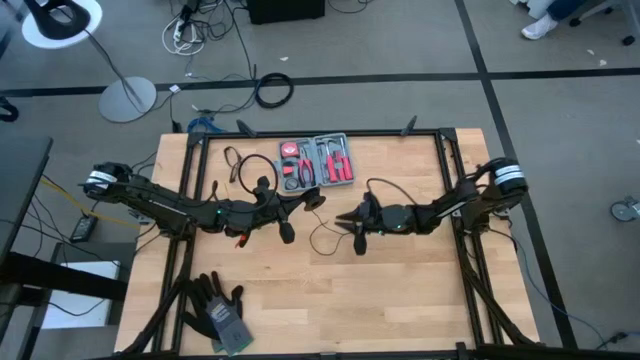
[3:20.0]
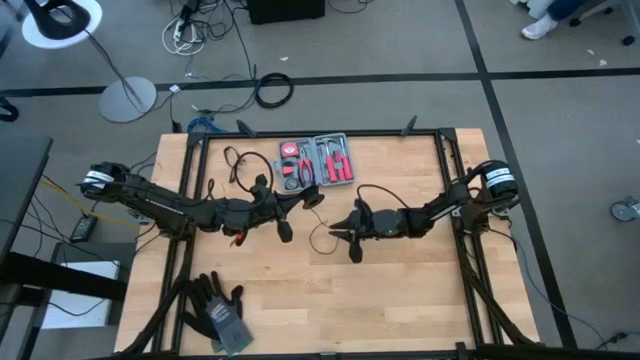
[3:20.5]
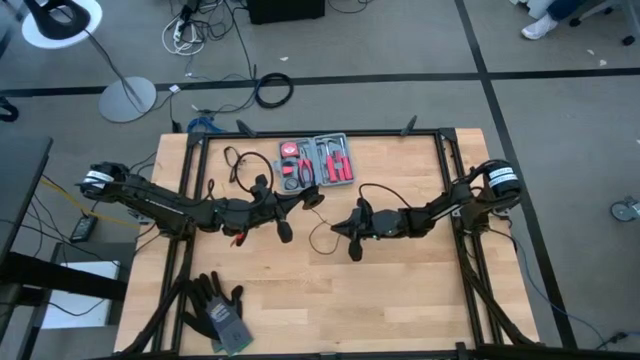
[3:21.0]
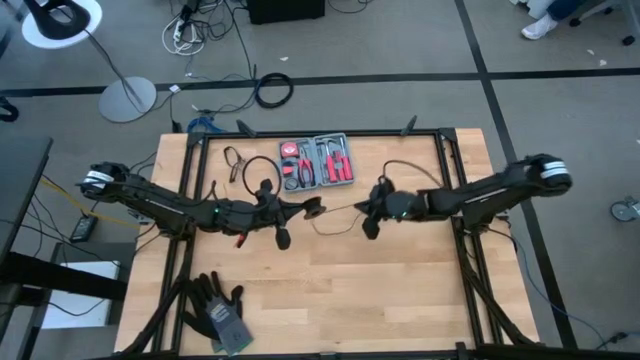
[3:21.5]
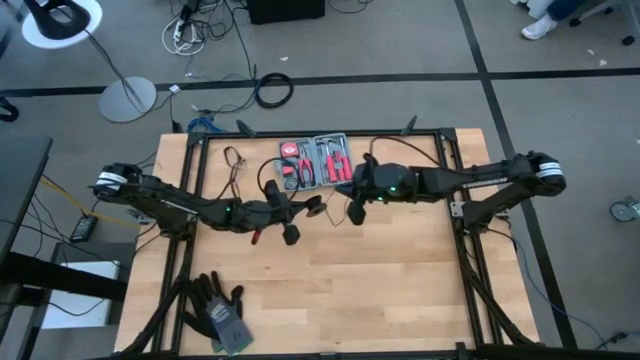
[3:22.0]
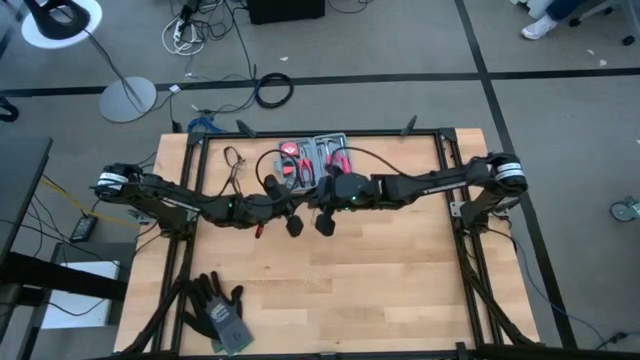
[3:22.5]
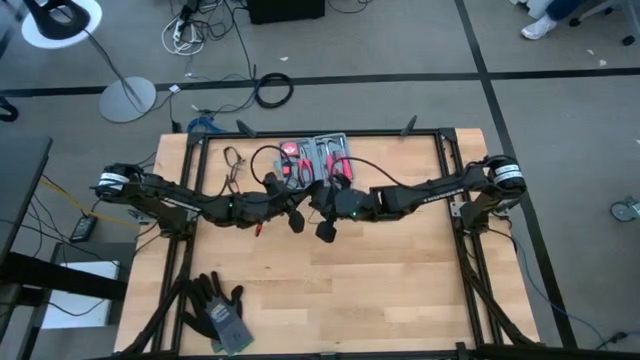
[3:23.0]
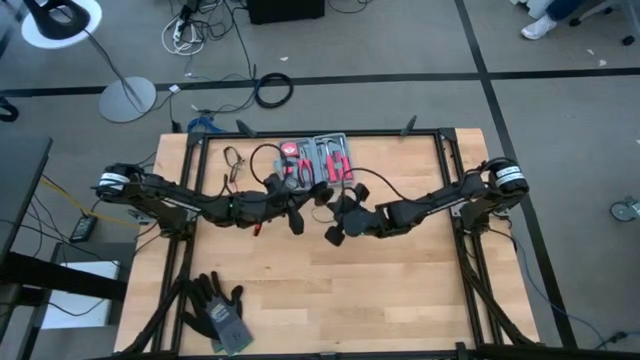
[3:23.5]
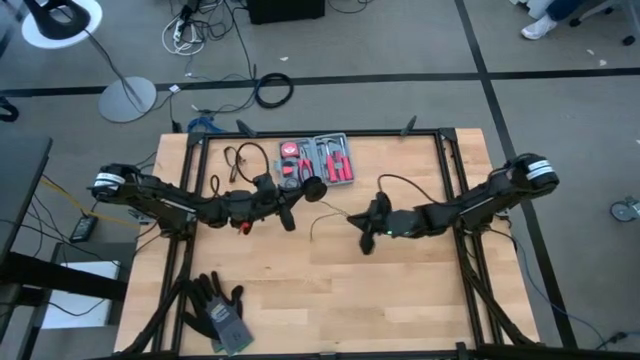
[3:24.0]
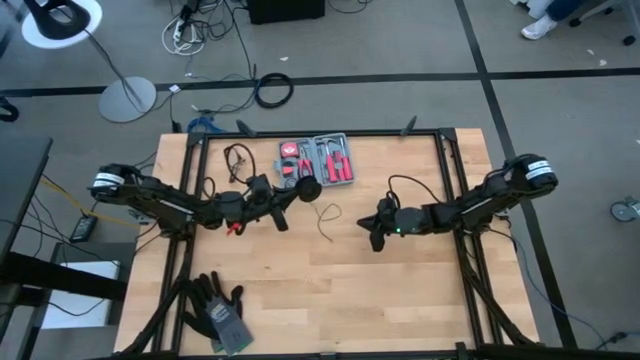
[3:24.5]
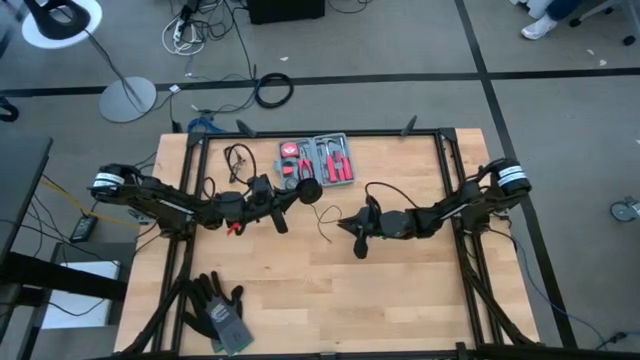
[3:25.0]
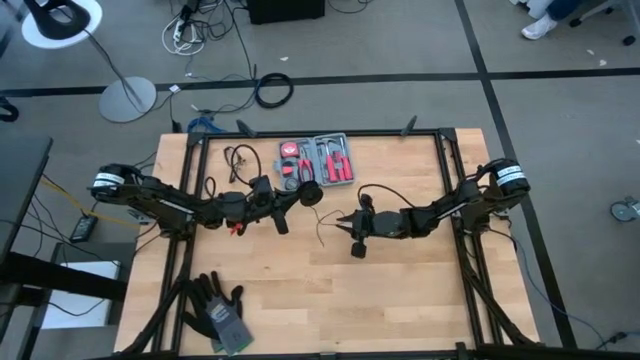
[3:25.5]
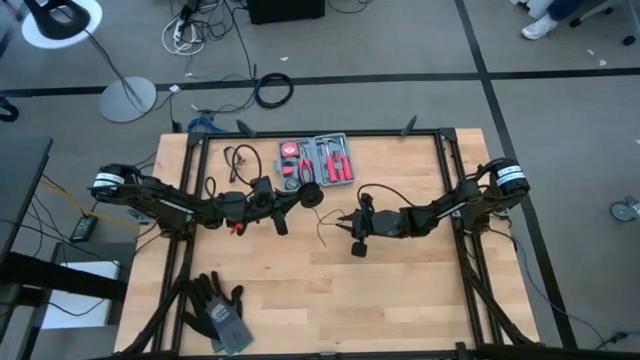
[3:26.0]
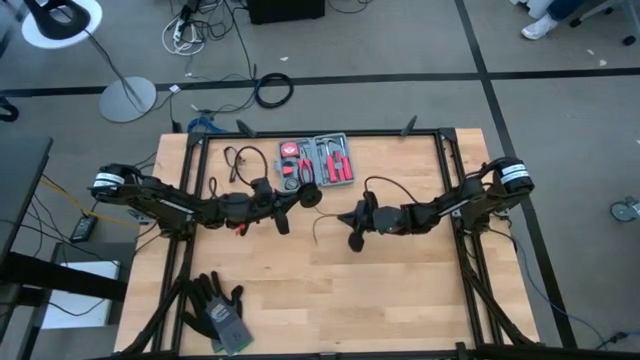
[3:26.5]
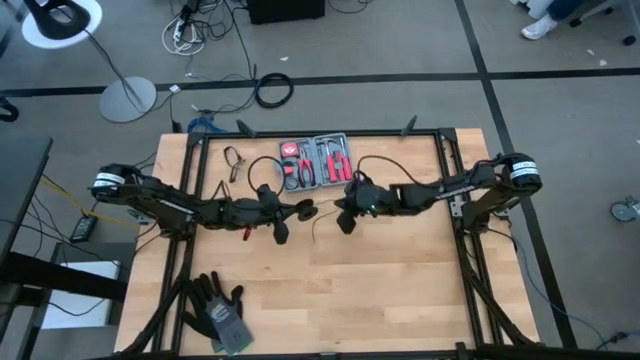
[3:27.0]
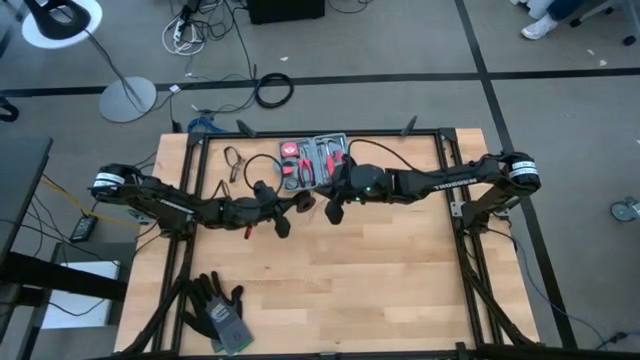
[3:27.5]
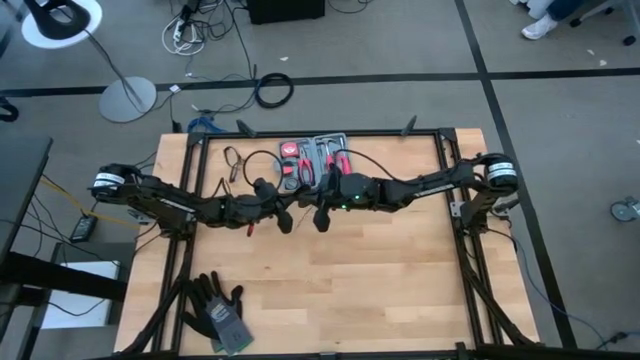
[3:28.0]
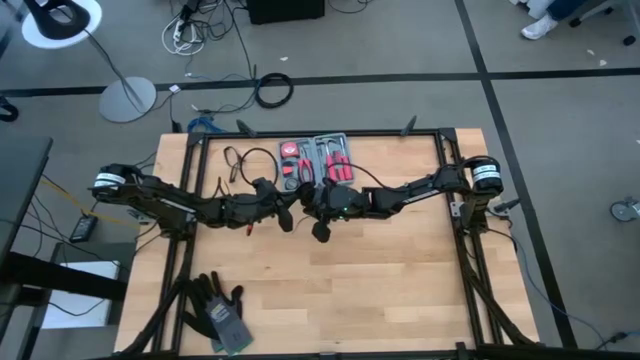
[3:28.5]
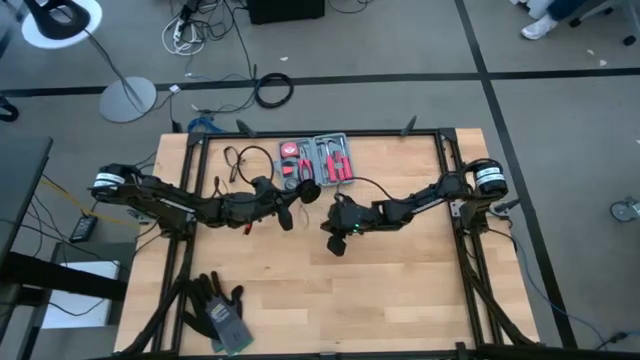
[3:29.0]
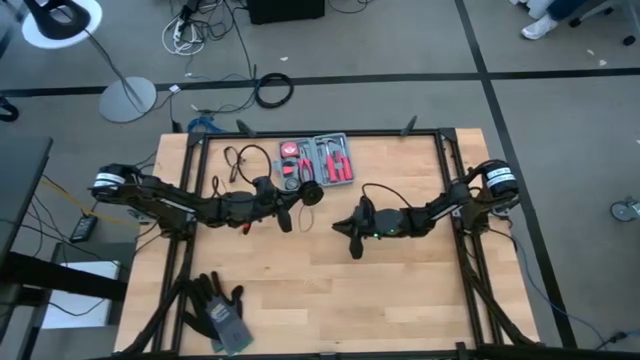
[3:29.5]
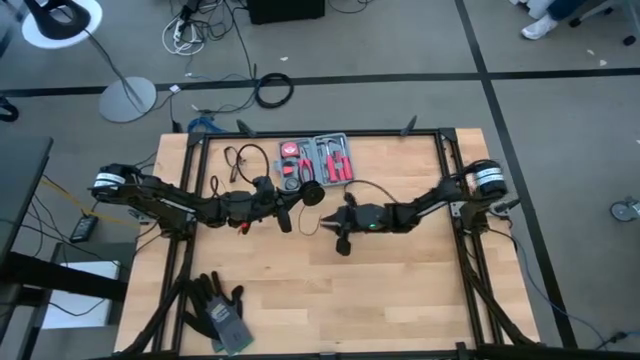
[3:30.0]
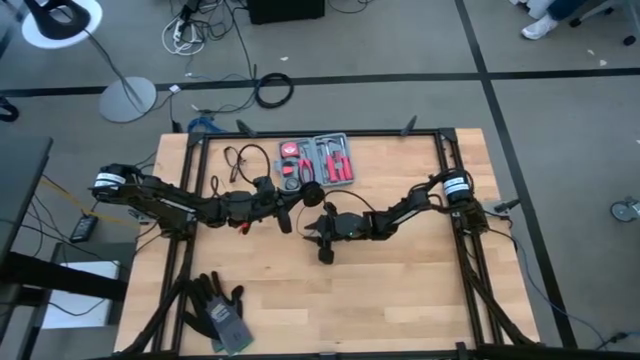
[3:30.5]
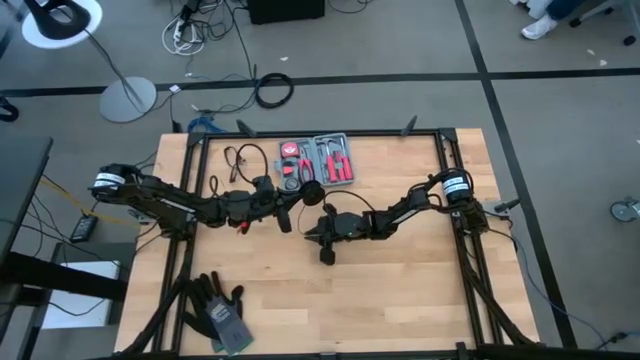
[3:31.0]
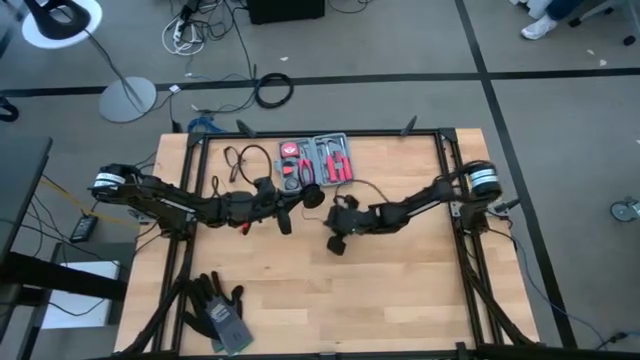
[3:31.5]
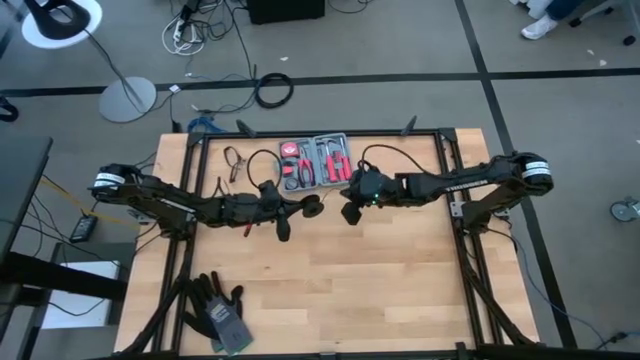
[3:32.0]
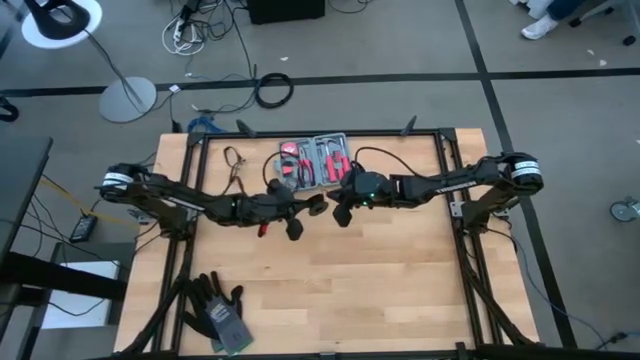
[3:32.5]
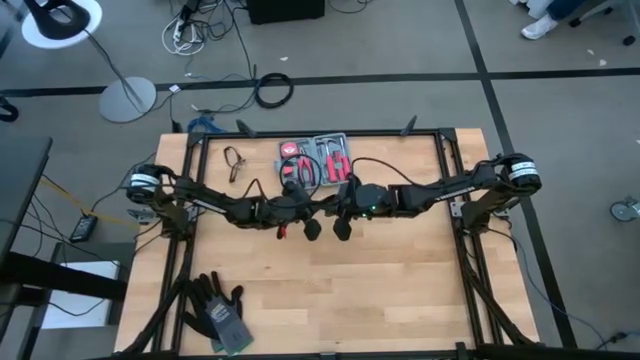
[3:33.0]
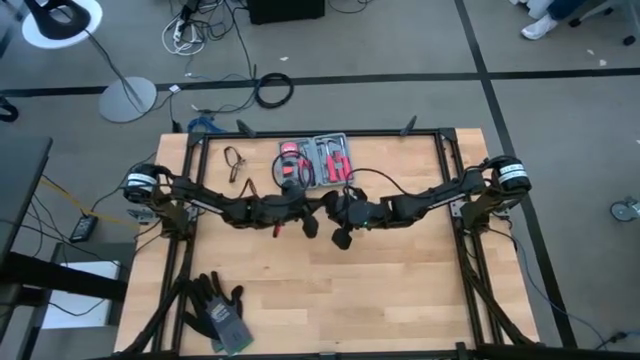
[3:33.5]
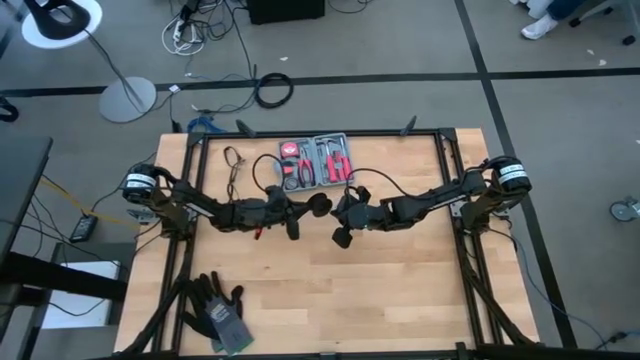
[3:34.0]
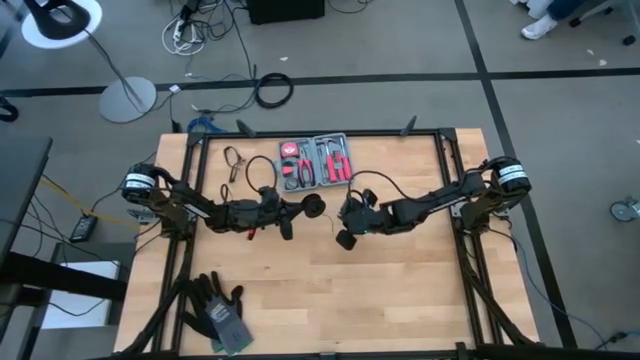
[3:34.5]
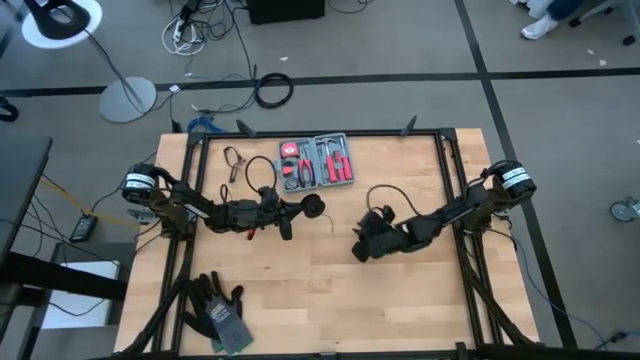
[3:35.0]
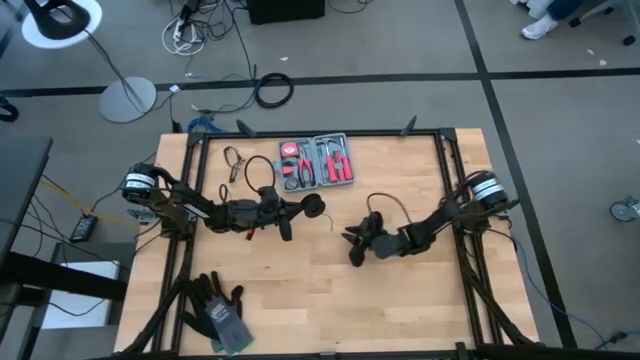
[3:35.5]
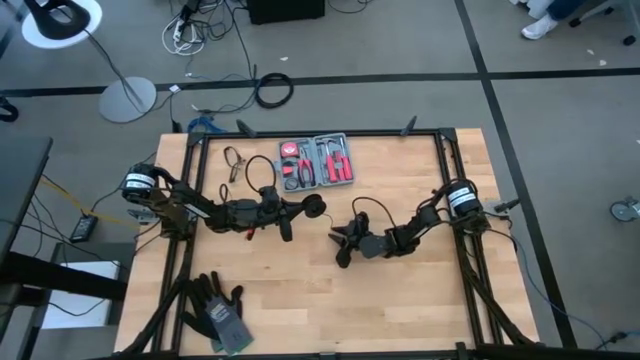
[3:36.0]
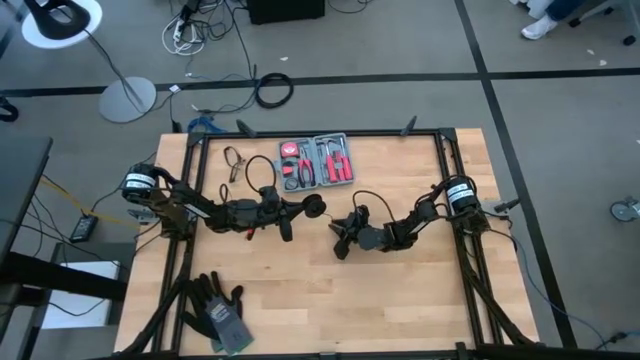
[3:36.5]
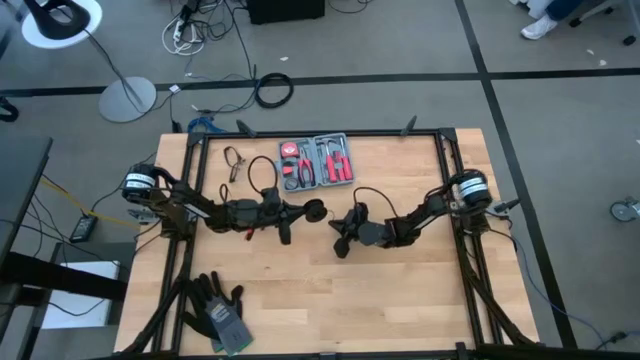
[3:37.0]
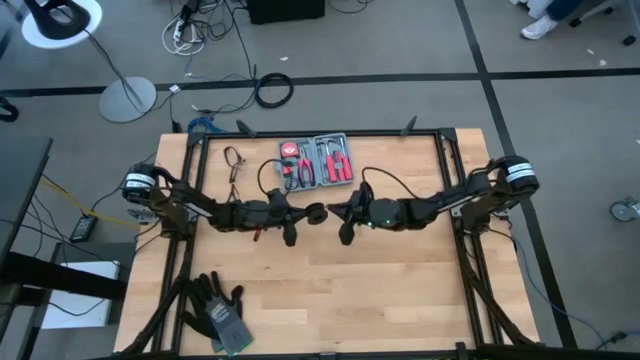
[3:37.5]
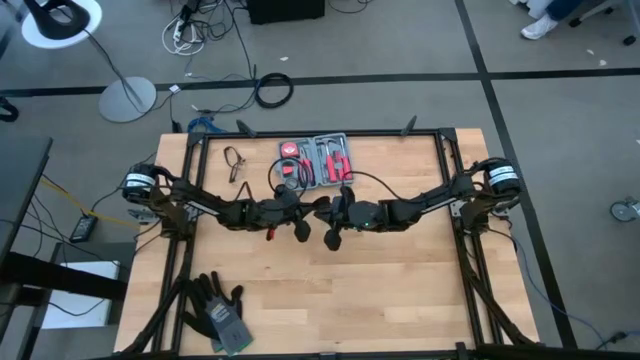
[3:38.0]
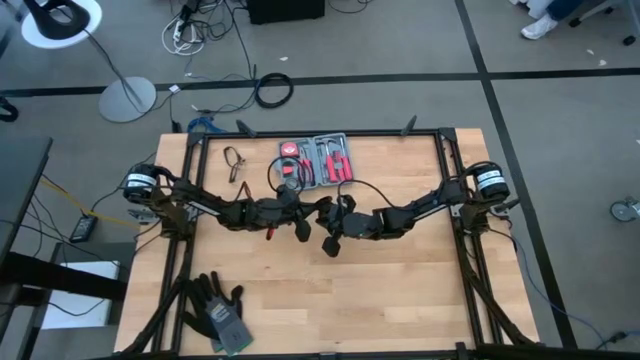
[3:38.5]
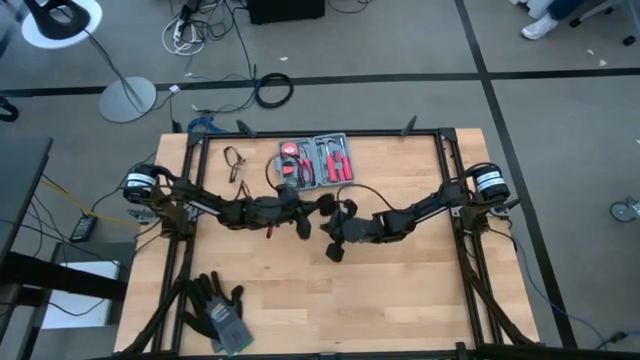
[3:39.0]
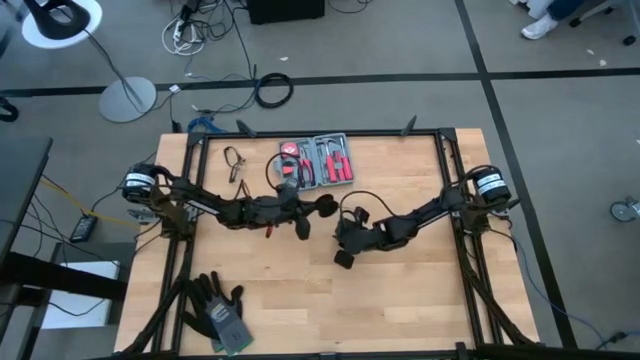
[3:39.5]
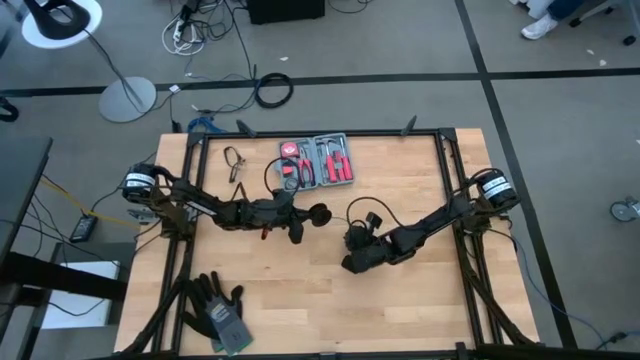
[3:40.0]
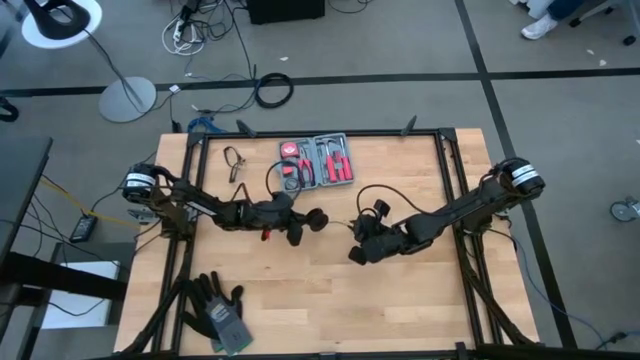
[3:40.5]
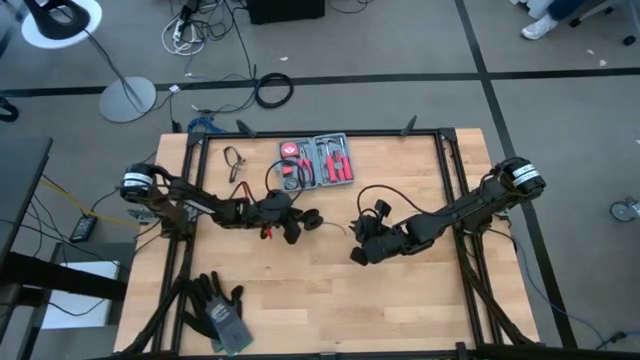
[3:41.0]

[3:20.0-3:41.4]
Task: Coil cords
Coil the black wire onto the black spool

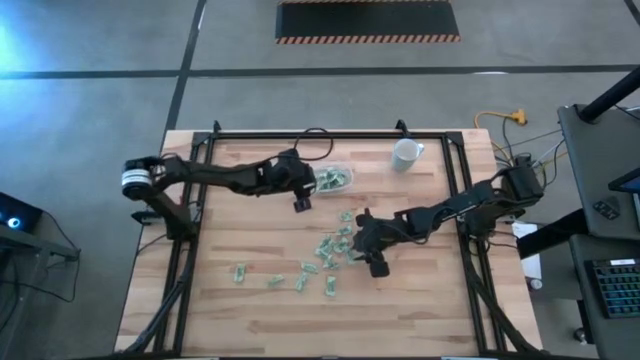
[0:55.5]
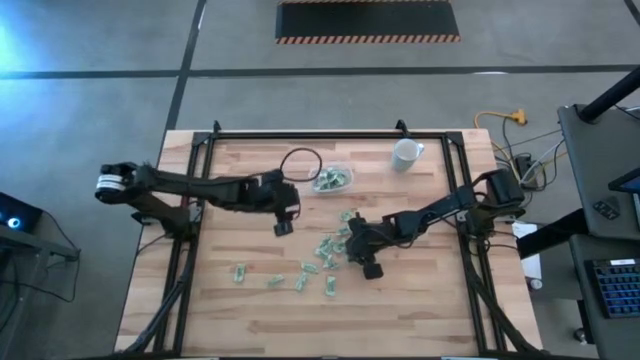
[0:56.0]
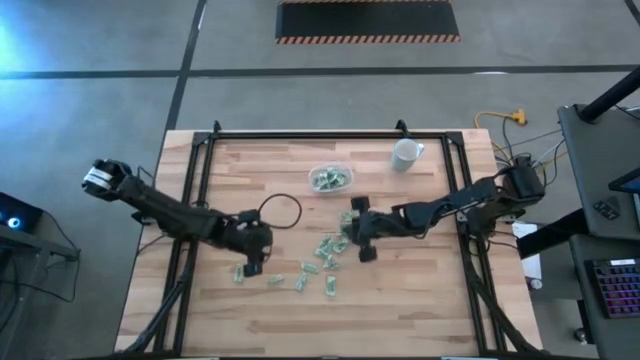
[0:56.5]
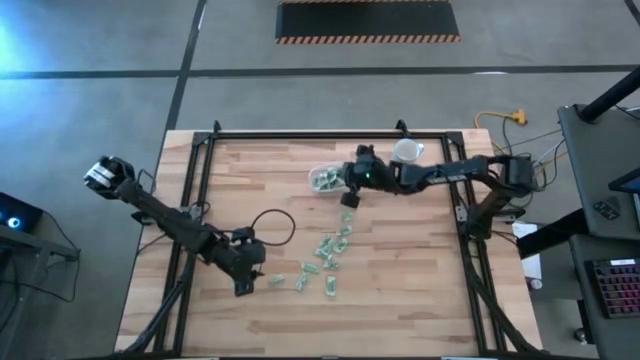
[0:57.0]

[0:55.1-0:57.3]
Task: Pick and place Stevia / Truvia into bins
Put the stevia packet into the transparent container
